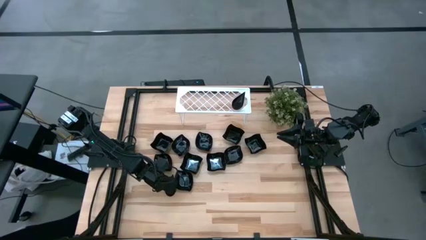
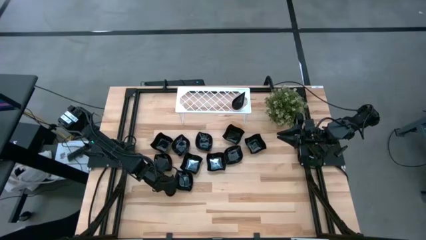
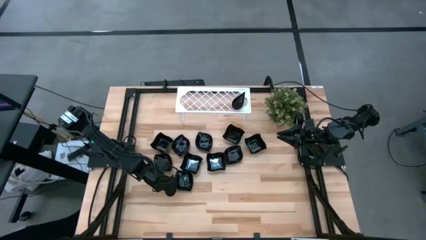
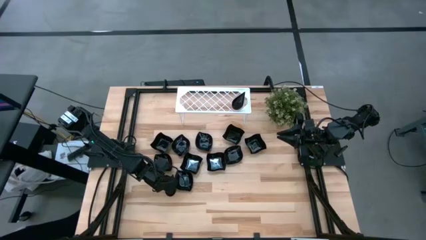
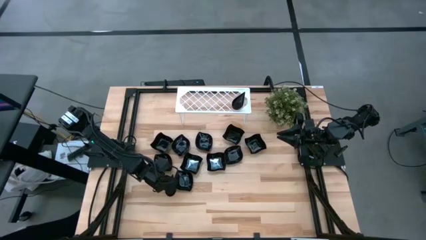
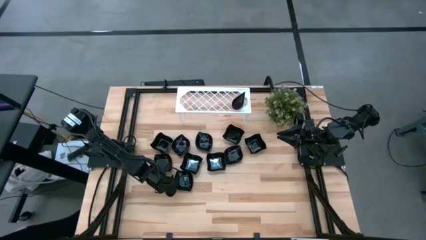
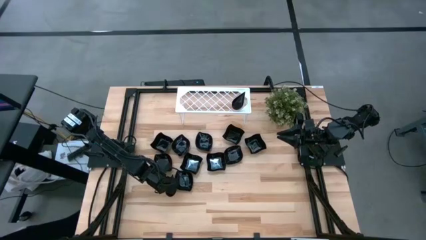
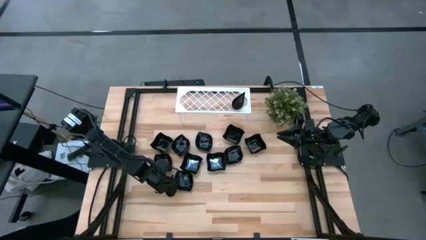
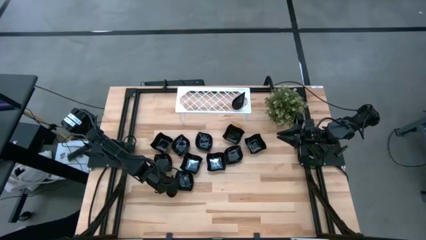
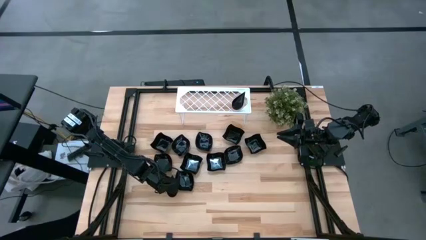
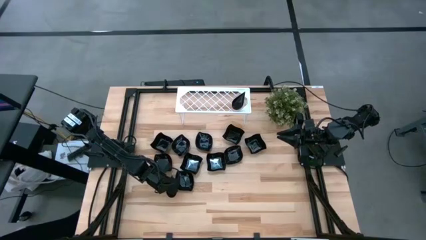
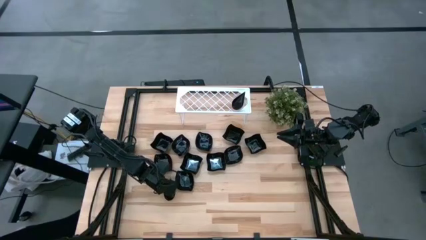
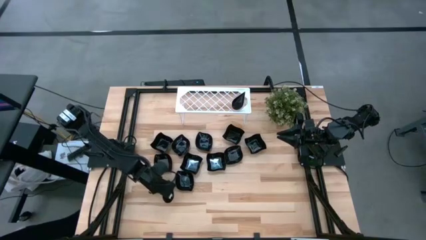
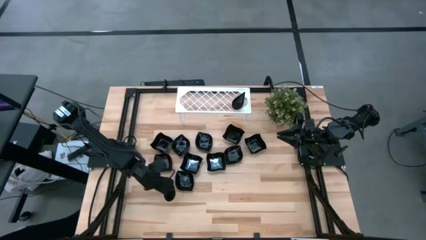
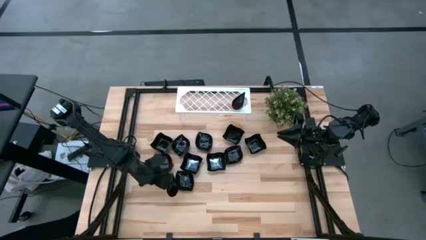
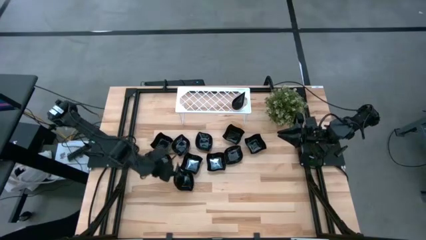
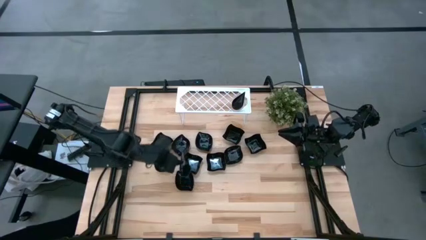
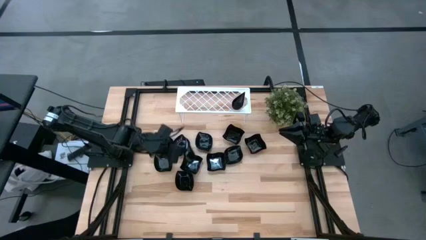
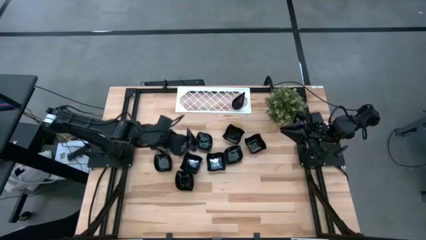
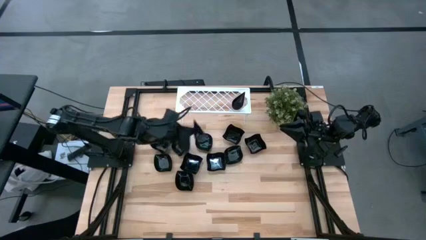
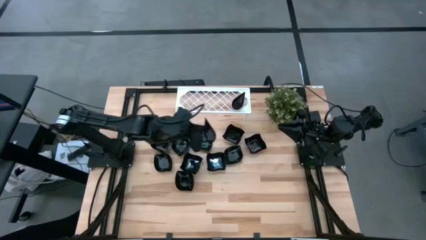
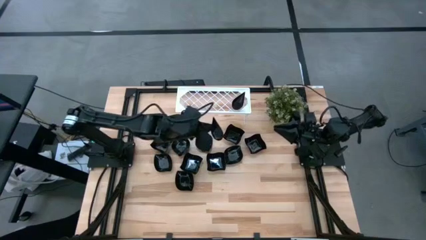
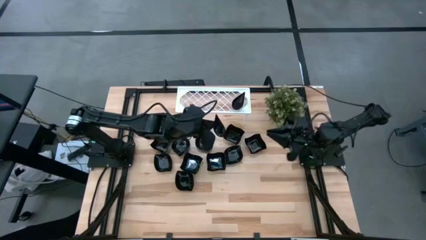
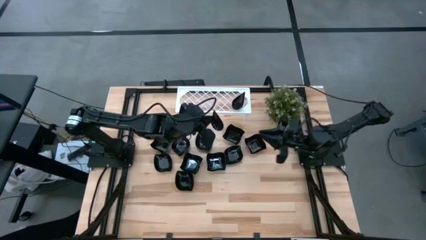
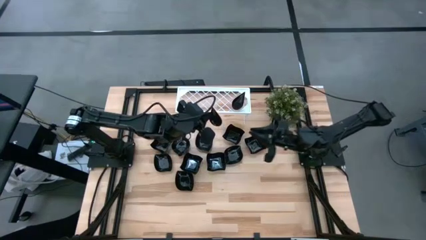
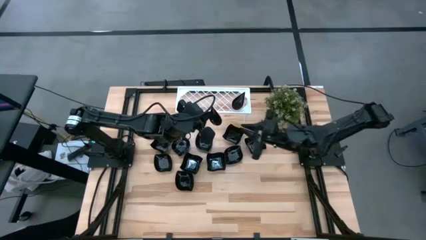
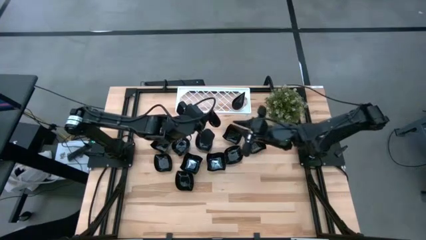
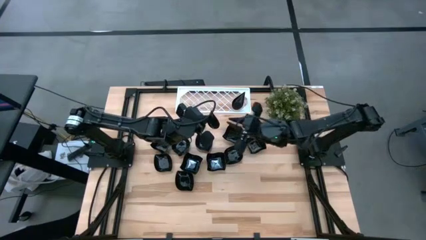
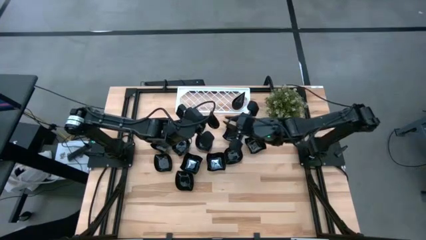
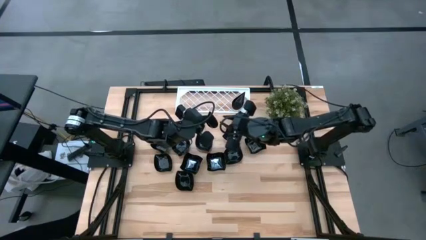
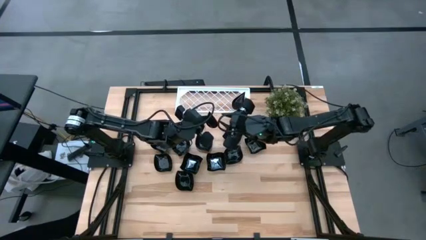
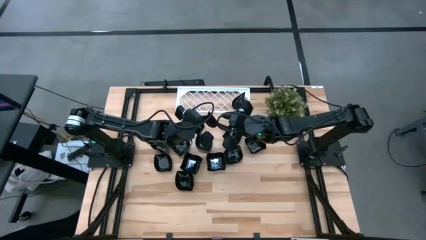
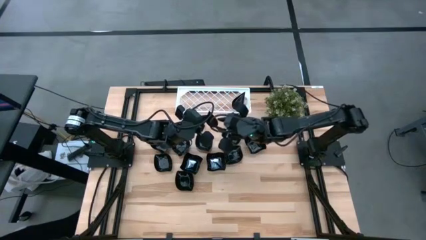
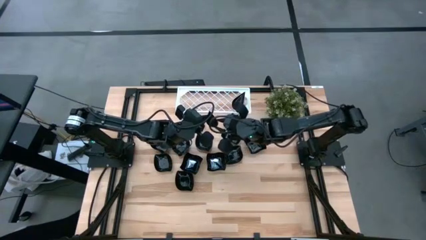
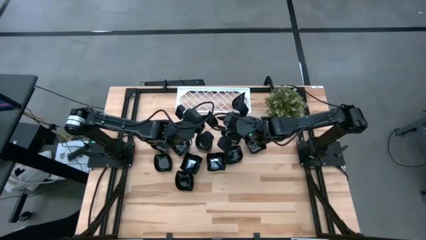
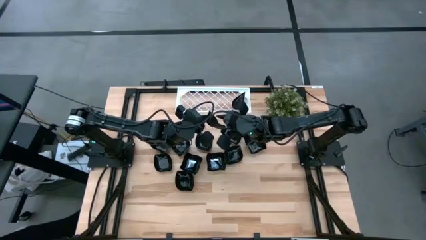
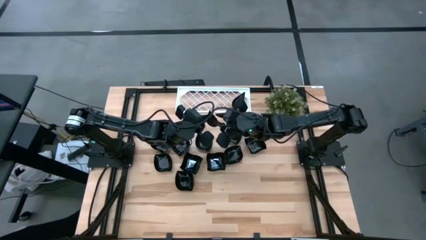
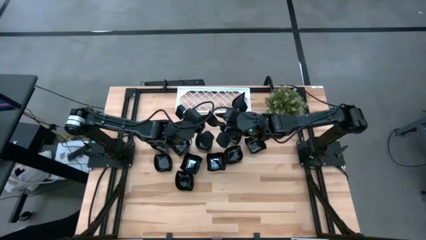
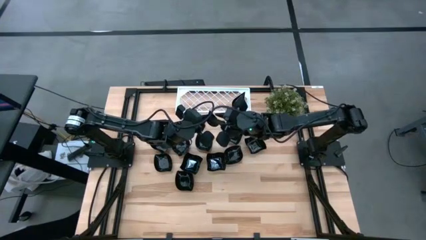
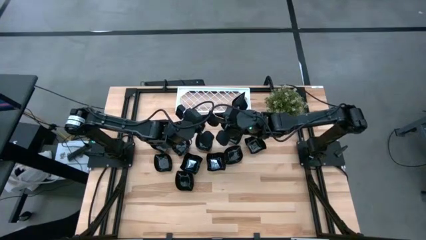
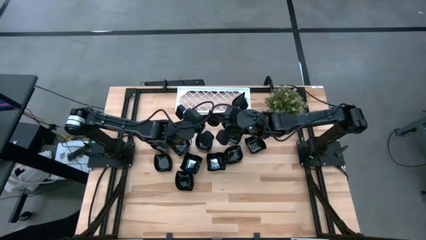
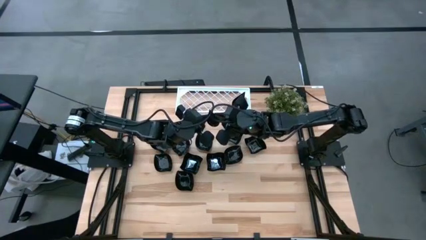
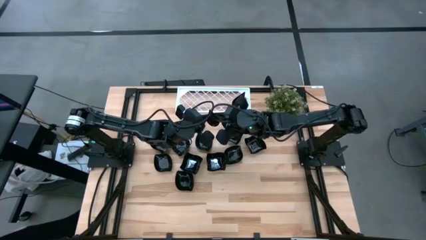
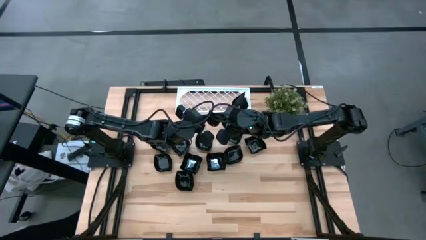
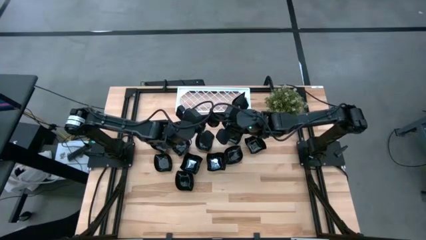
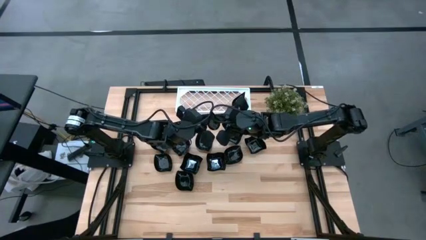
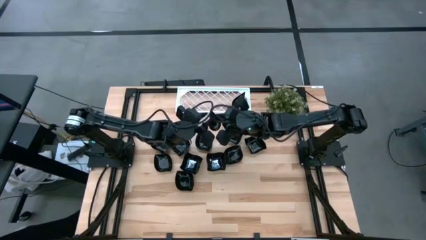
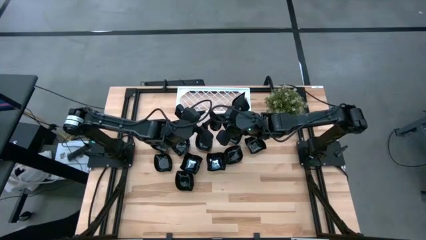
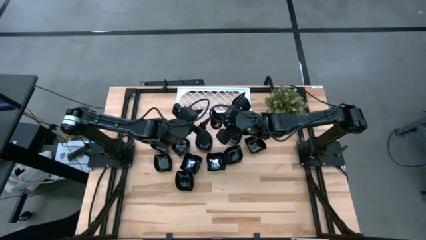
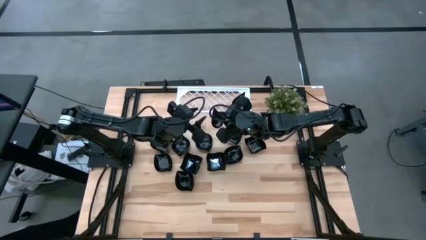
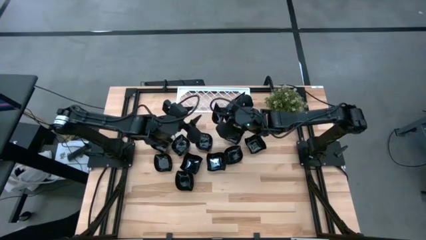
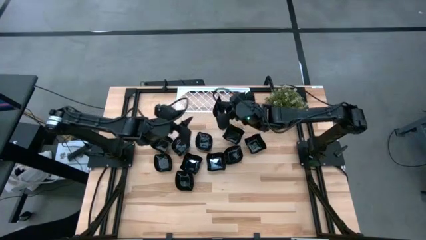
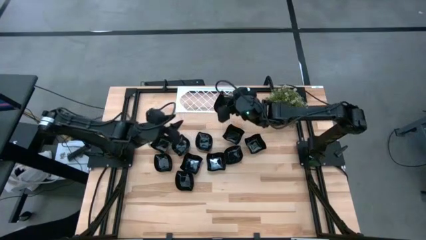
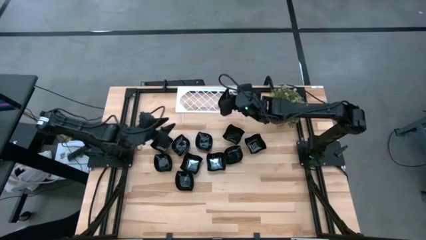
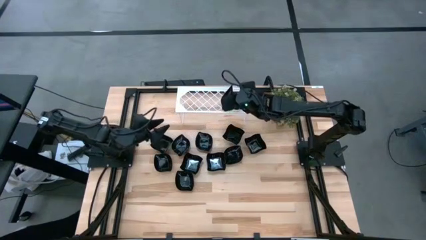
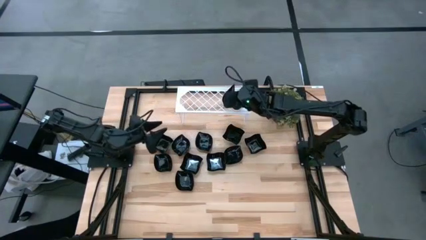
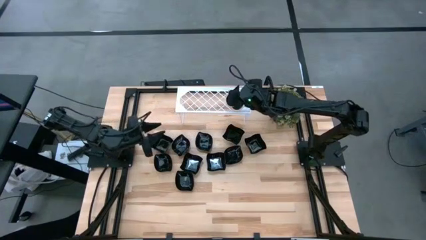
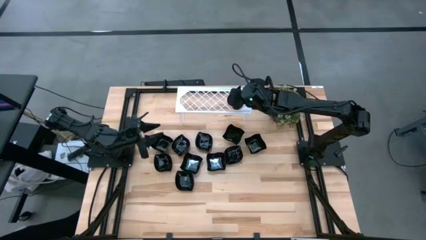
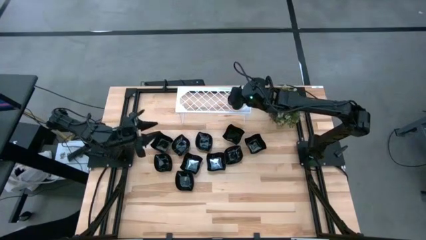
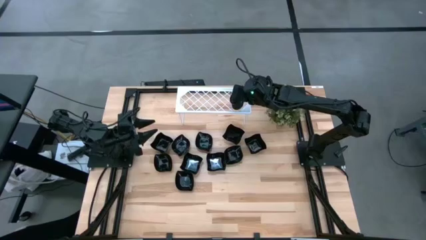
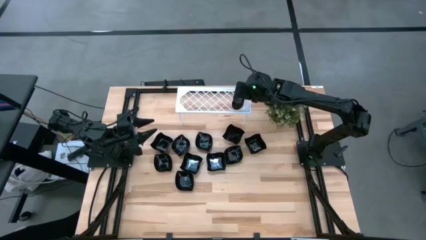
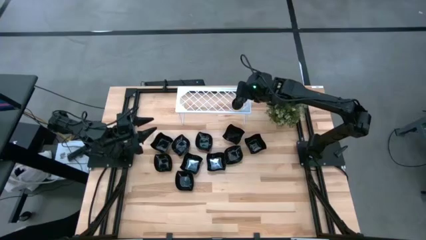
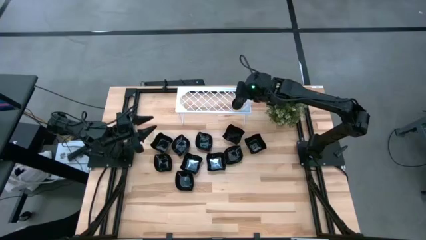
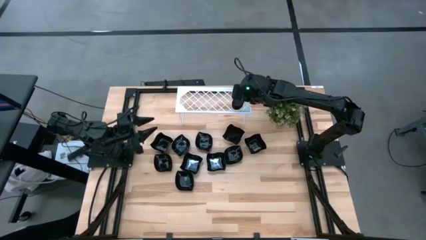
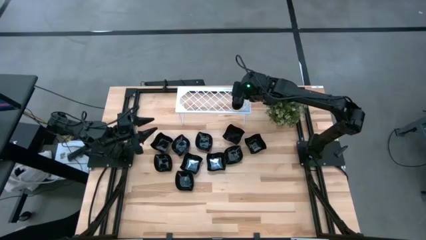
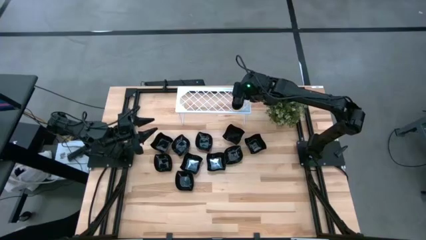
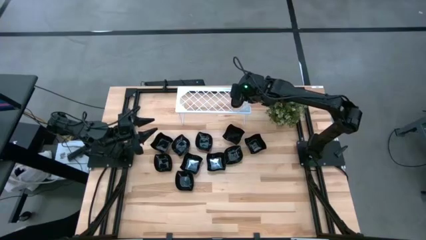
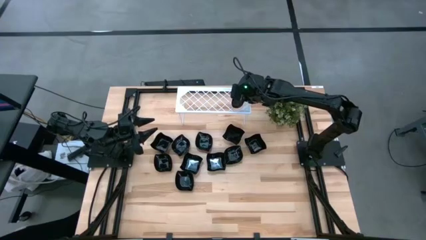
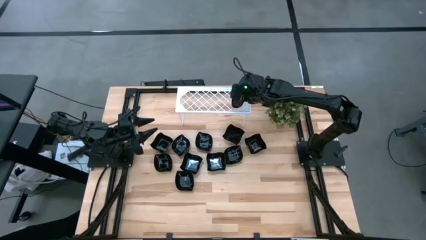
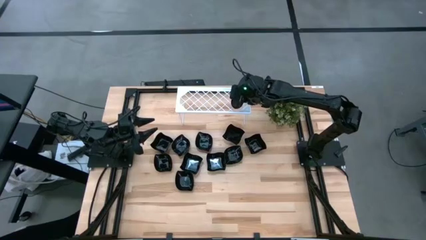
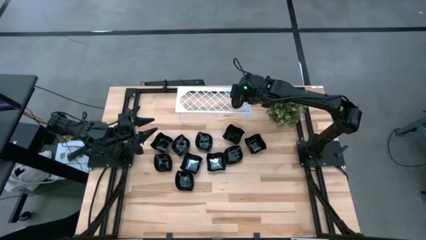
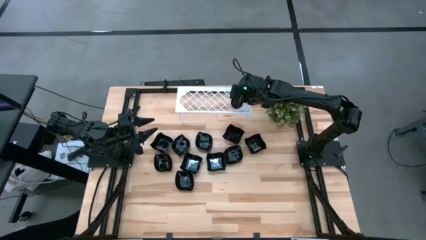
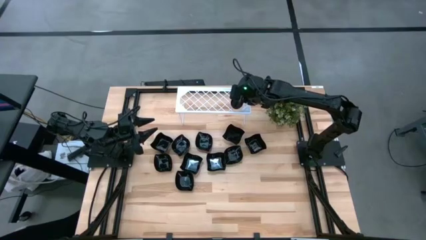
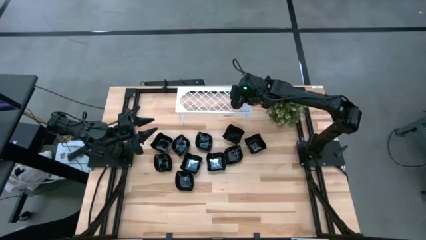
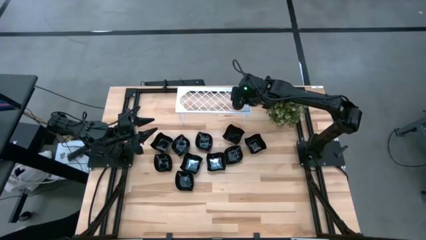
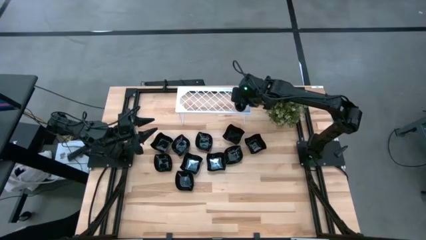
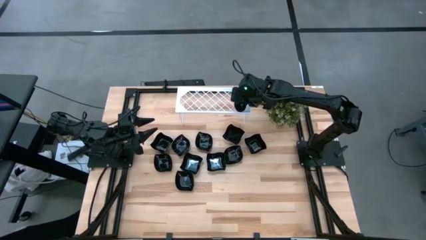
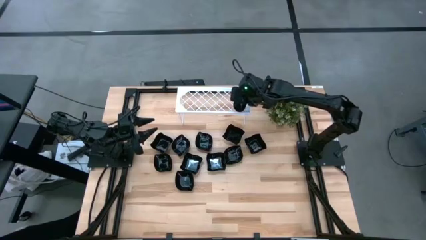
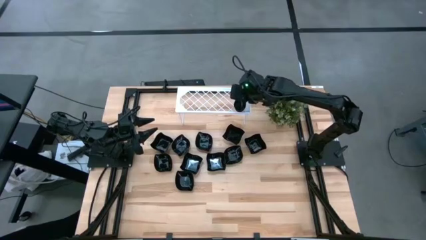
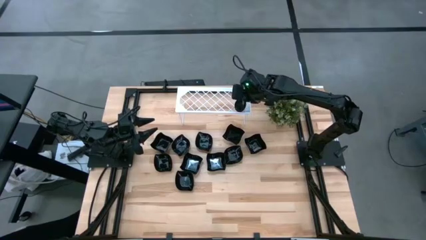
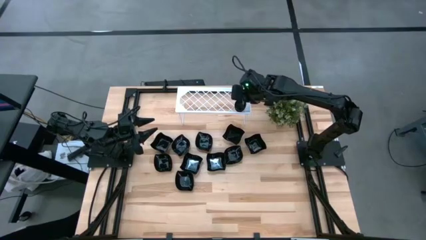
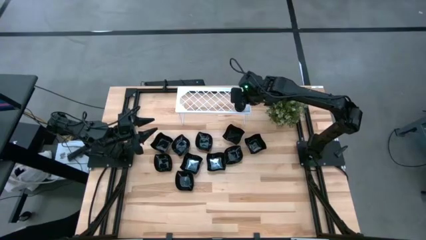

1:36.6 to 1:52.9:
Task: Pick & Place Mini shaped plates
Stack the drop-shaped plate on top of the drop-shaped plate on the shelf
